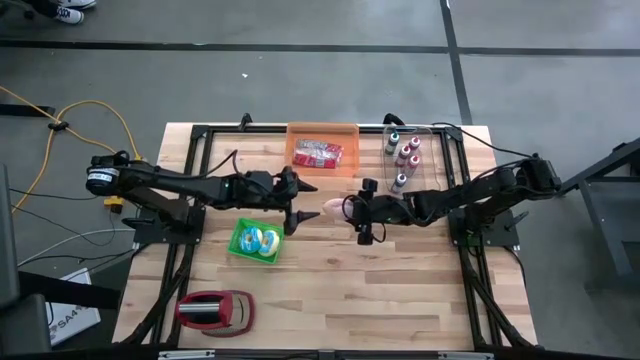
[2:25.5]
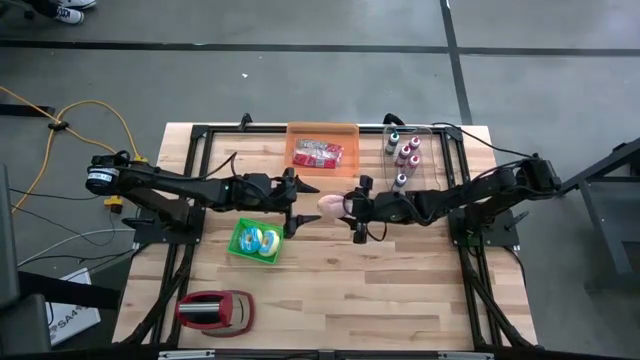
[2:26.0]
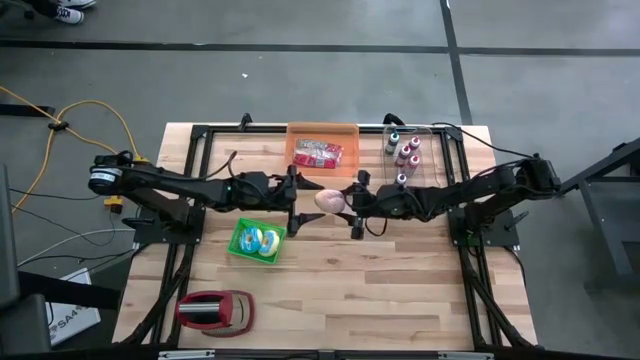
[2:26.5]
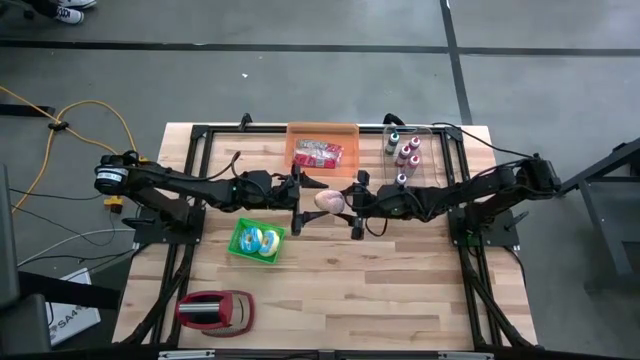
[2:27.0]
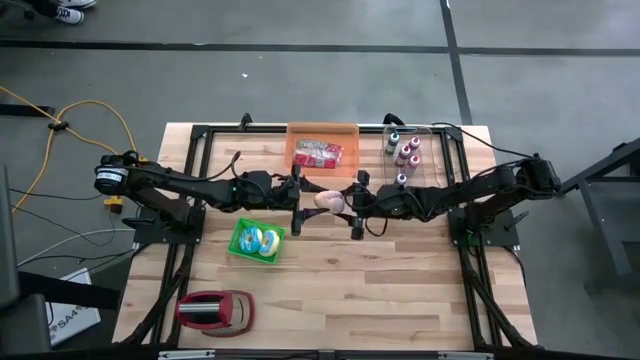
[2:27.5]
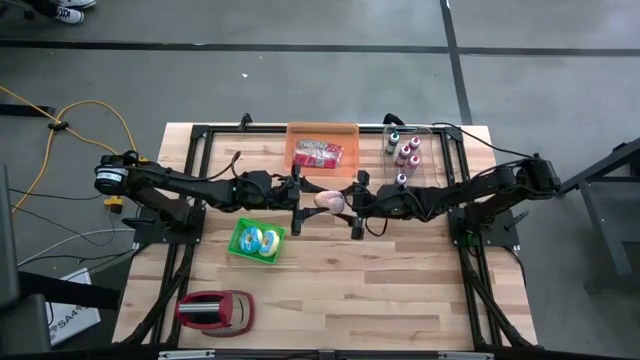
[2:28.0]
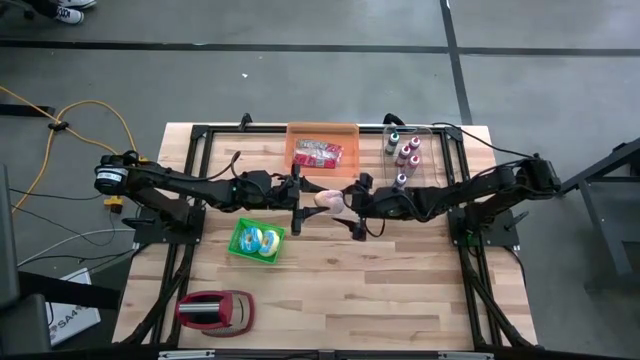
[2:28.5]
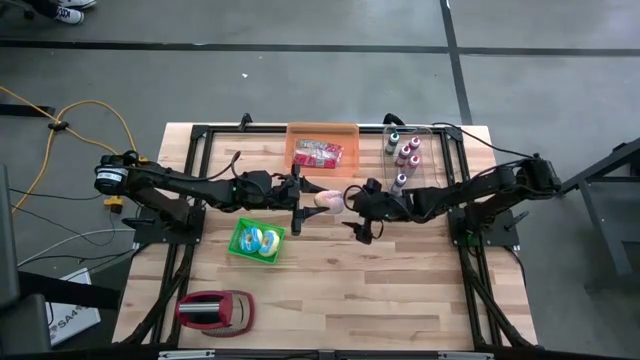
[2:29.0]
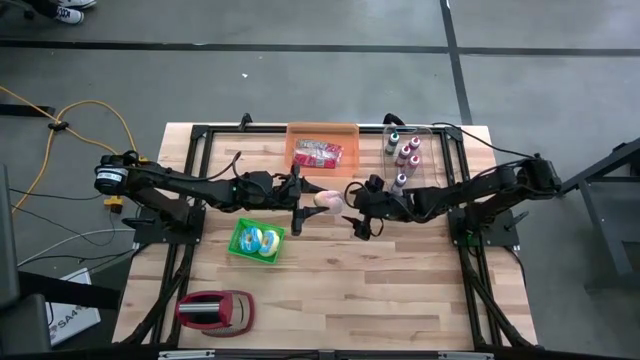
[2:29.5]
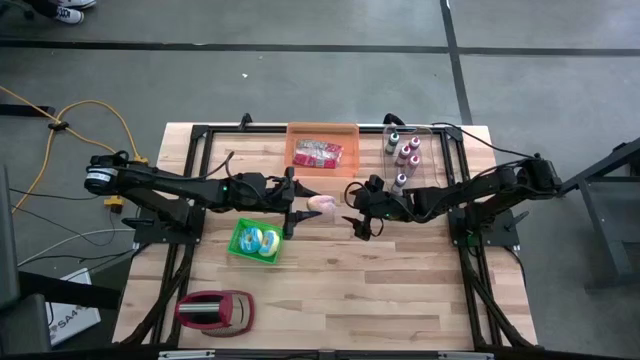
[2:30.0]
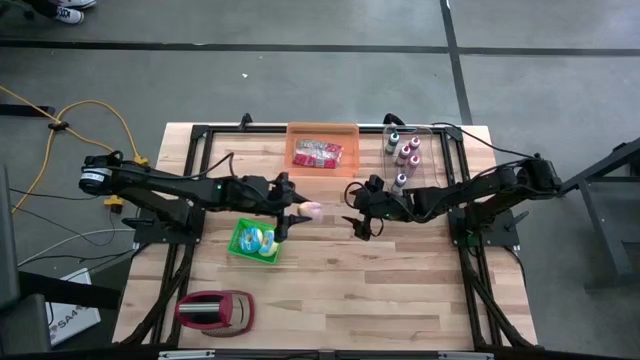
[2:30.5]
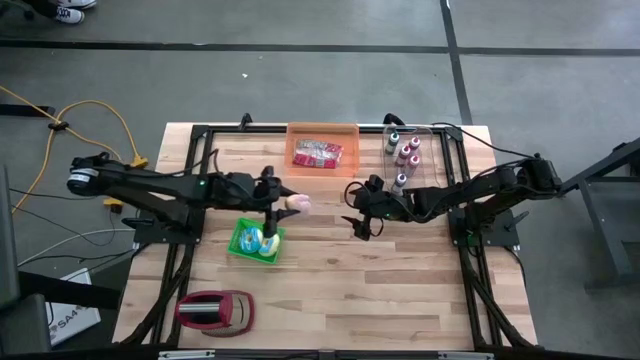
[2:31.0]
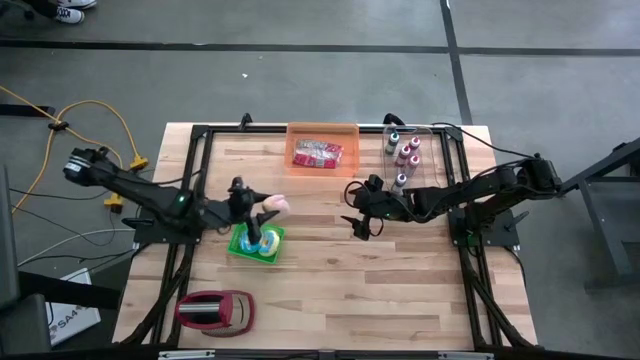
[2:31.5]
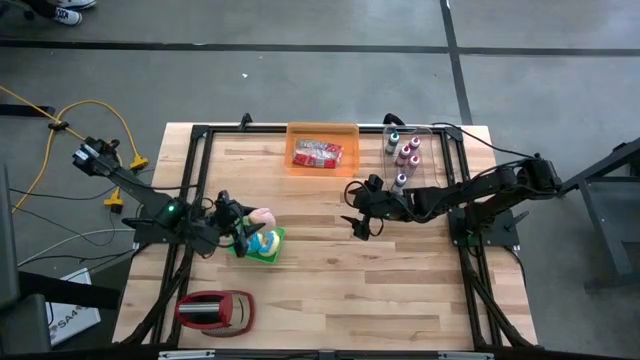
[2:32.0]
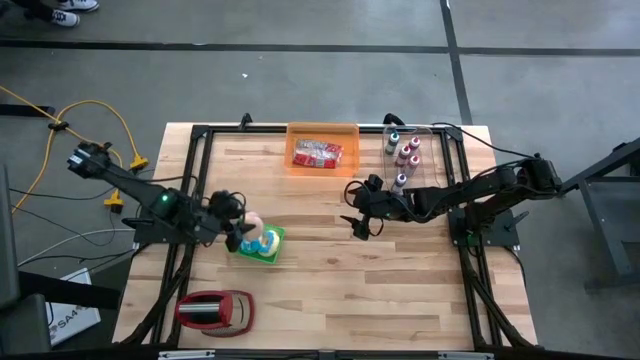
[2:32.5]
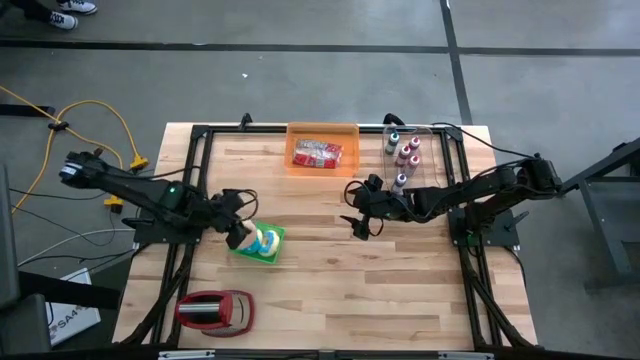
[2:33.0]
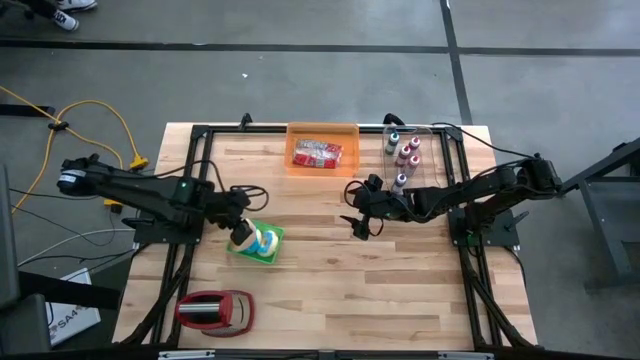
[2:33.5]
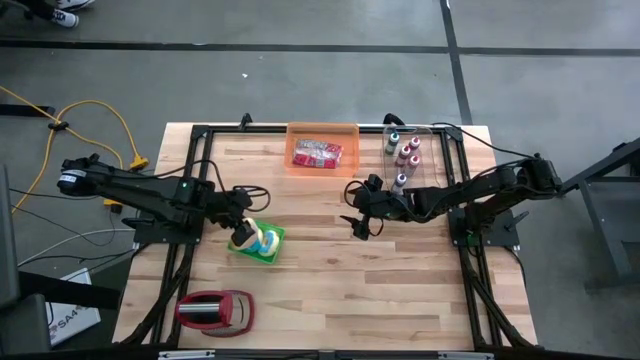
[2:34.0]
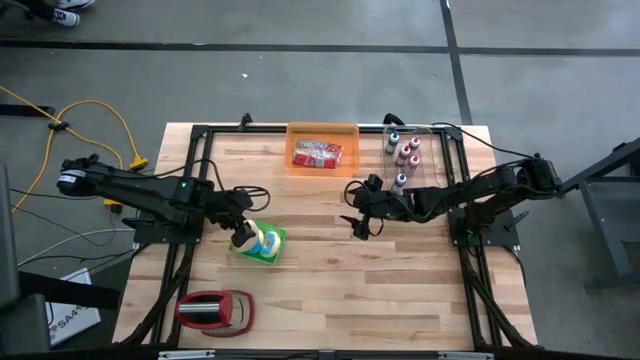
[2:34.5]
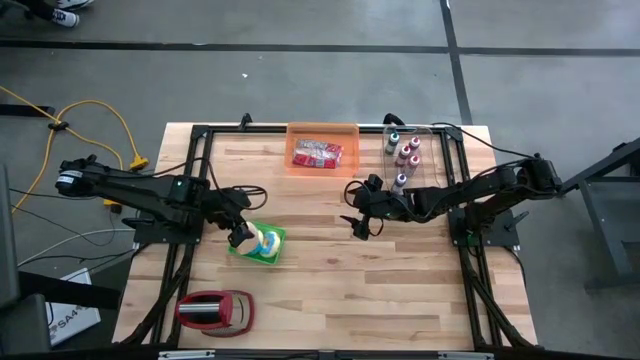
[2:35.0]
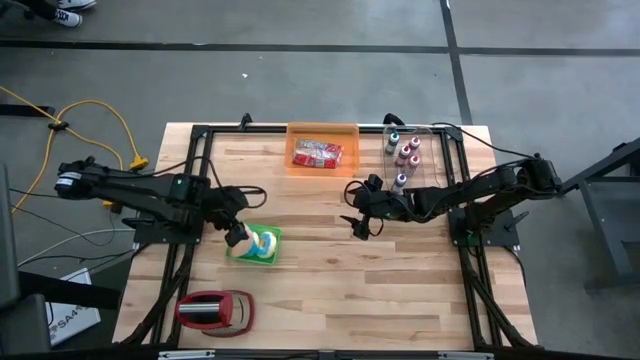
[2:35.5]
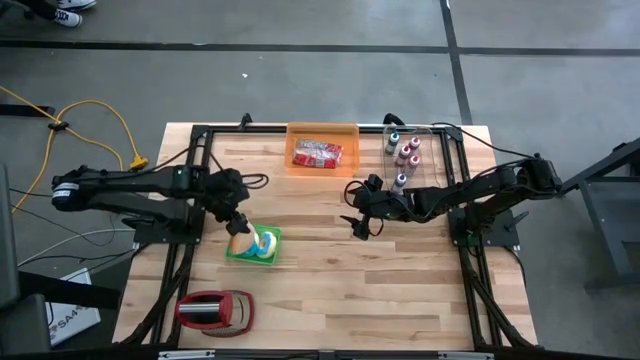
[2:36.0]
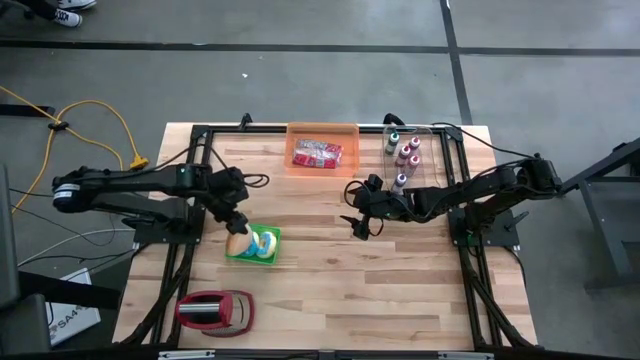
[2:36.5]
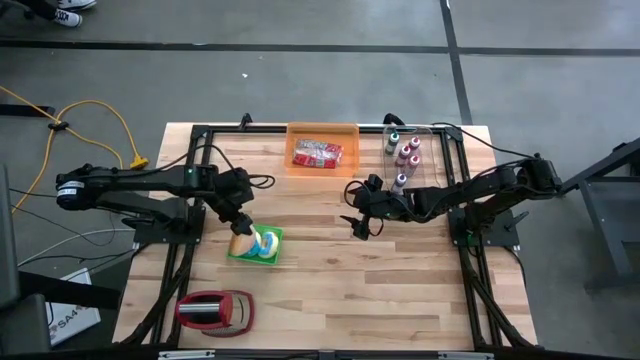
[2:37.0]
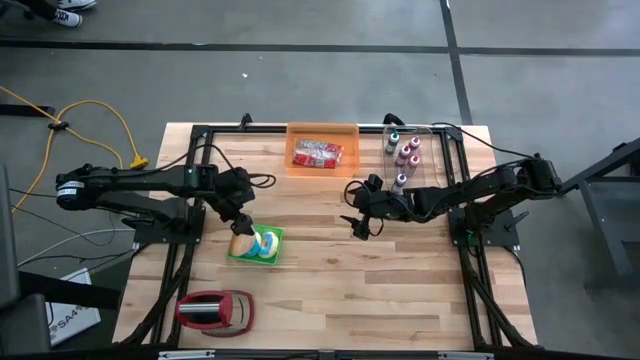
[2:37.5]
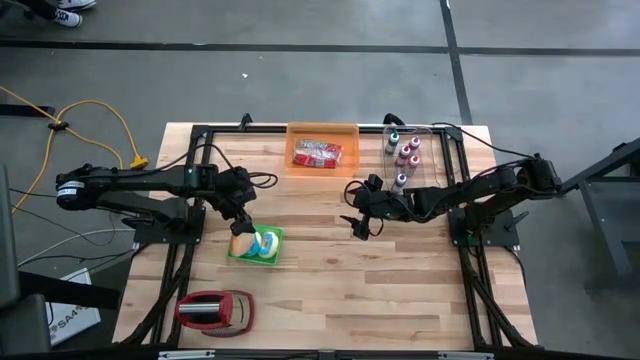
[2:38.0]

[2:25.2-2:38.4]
Put the brown donut into the green bin
